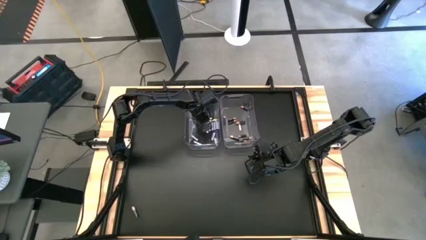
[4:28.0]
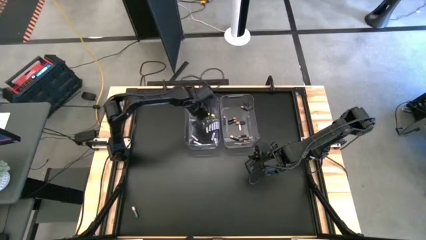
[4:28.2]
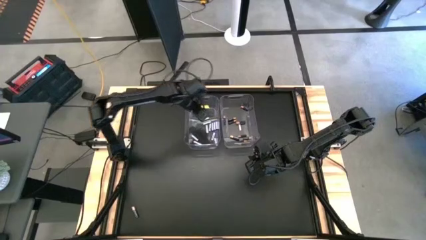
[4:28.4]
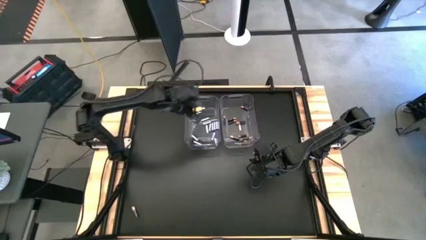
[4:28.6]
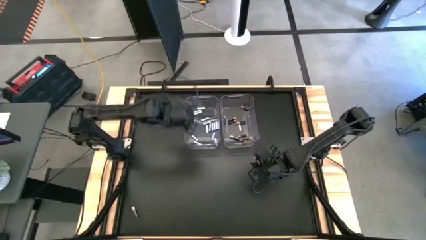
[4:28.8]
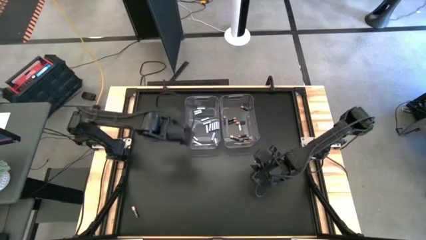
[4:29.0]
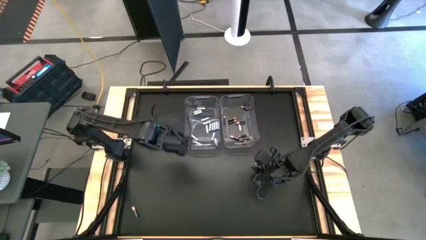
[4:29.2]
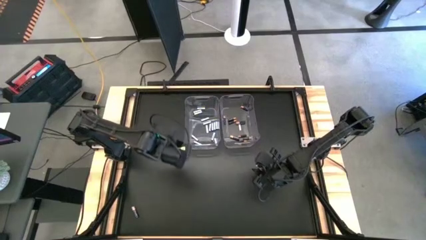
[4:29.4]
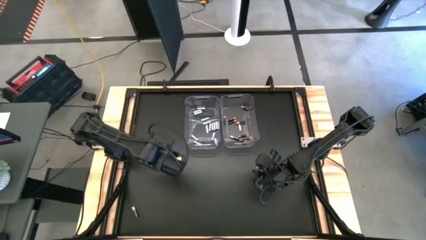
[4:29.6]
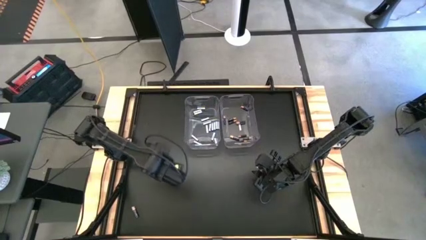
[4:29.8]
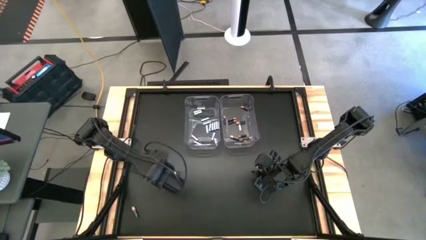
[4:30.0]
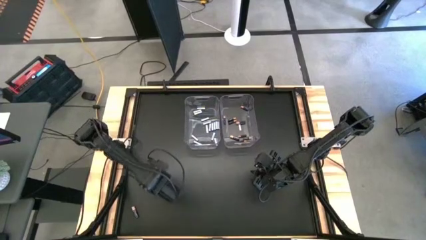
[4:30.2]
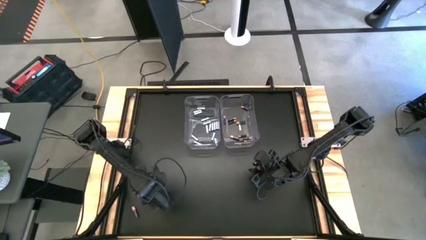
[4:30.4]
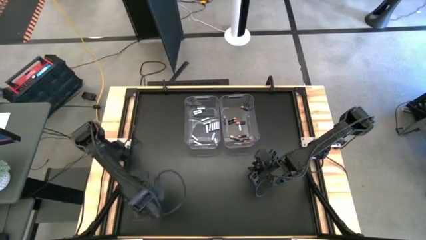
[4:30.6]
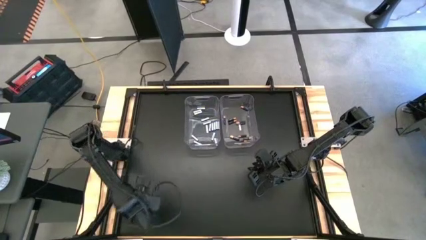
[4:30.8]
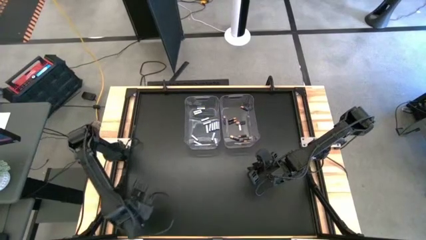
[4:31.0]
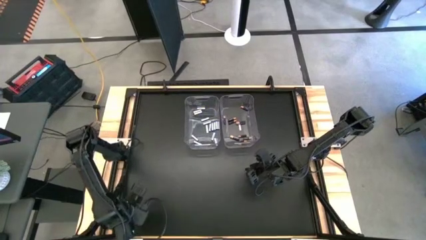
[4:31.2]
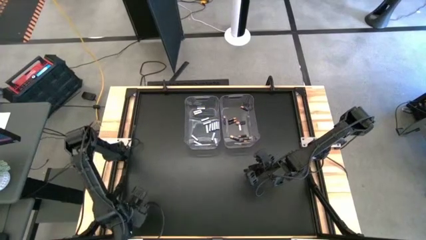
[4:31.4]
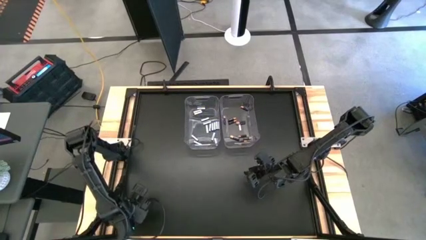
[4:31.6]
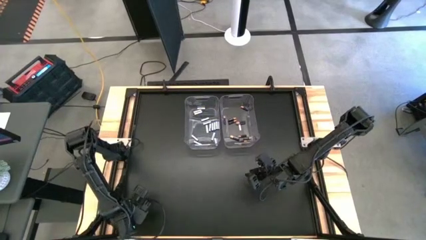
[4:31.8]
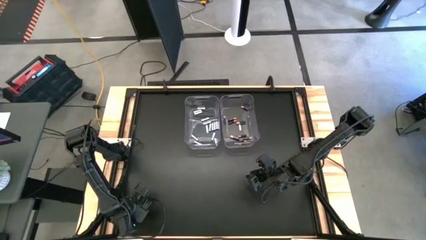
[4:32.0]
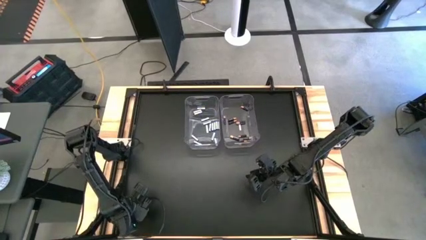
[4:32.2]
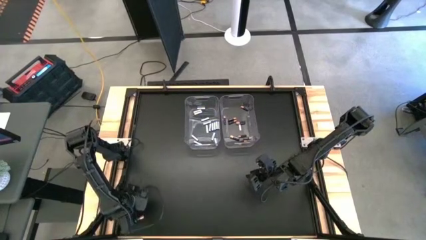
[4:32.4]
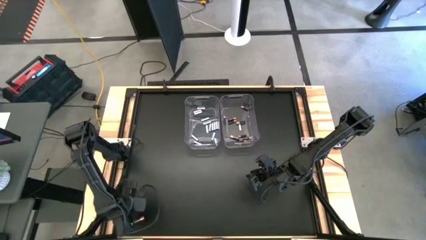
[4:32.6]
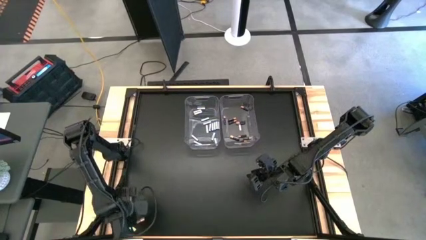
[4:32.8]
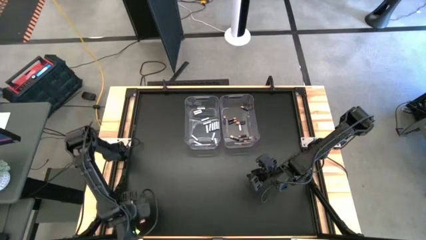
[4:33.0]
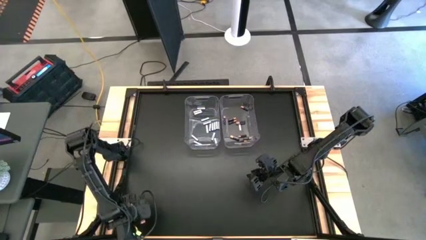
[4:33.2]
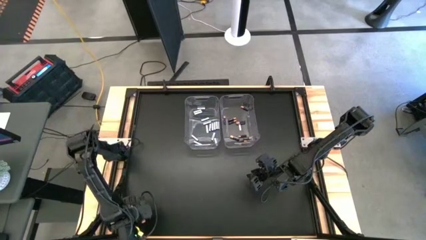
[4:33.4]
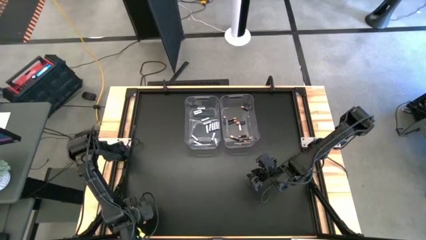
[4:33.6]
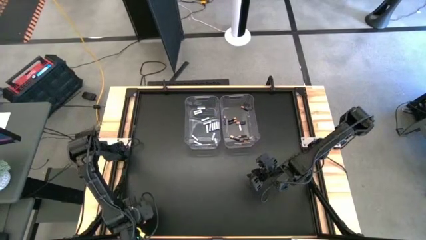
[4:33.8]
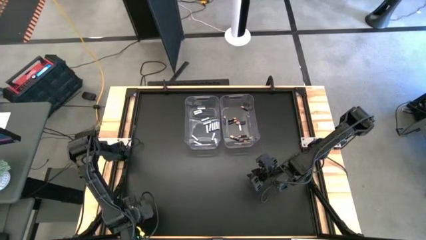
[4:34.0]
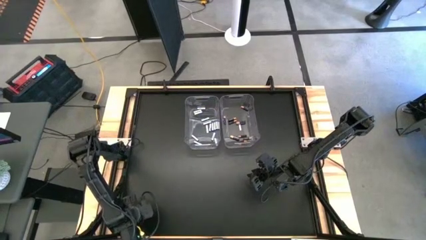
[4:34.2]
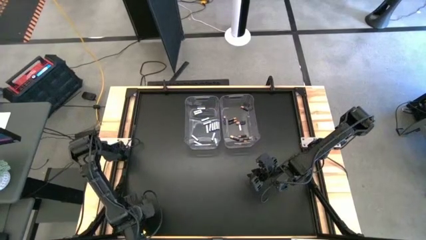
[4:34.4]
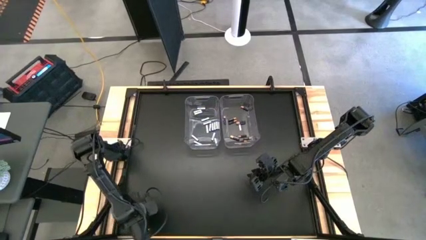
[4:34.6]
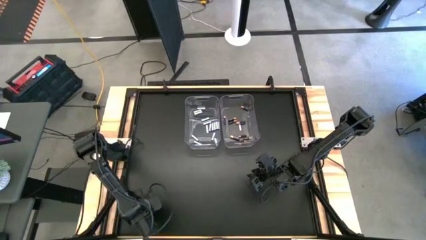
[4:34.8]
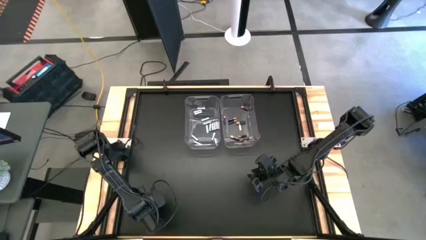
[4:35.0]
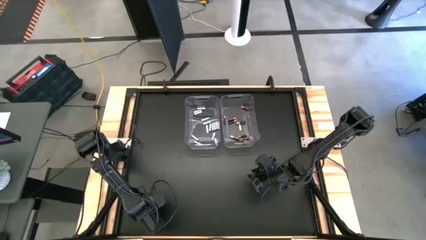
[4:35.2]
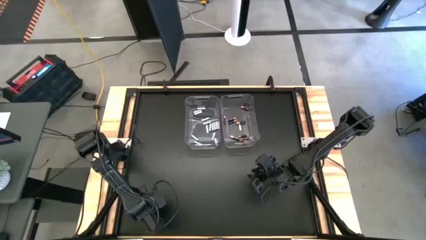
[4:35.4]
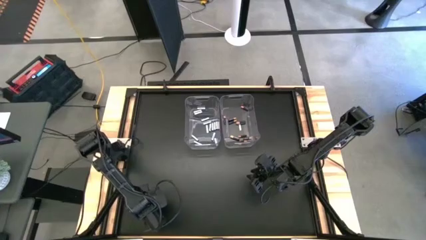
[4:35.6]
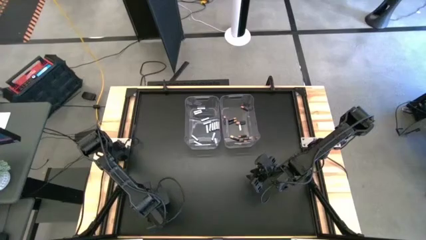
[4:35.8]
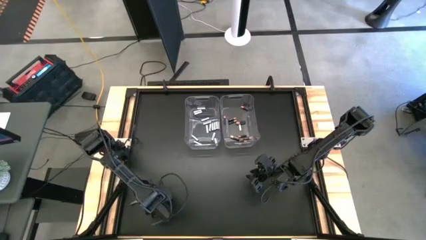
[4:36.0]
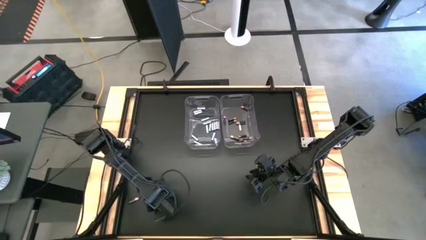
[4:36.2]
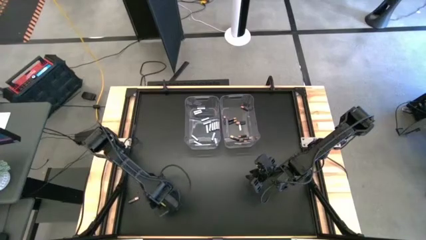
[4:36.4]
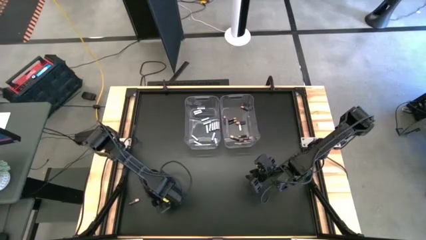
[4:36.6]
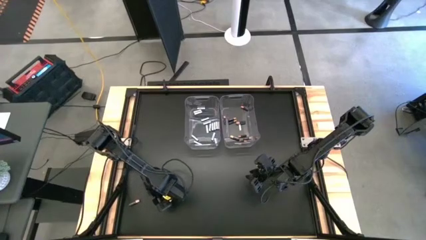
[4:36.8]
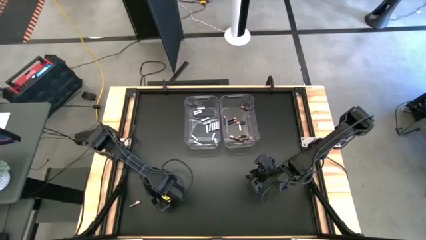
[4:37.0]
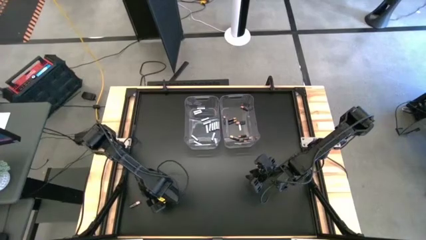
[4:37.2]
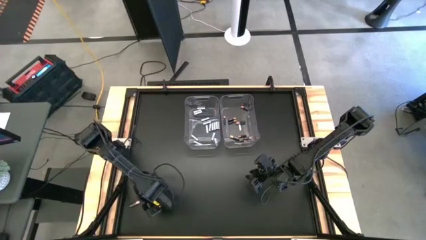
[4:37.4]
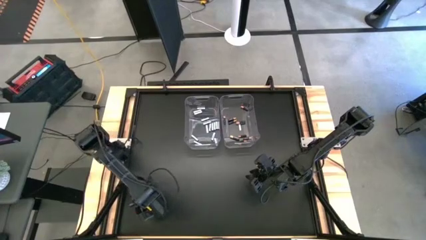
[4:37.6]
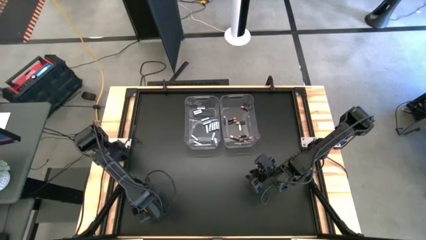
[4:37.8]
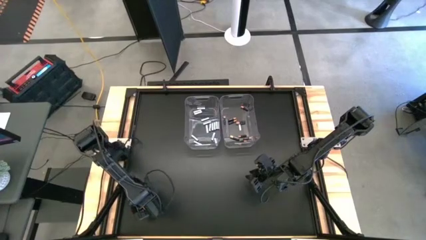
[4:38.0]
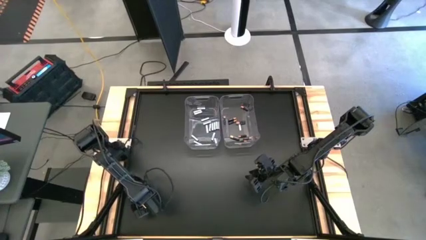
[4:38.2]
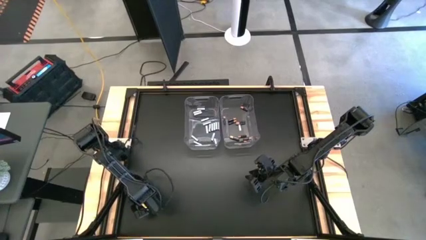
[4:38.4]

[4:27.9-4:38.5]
Task: Sort batteries
Put the black battery into the right transparent bin

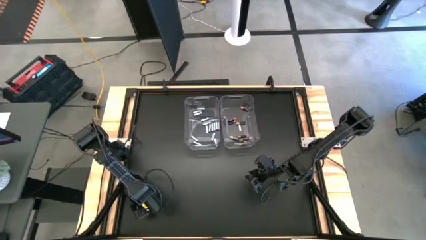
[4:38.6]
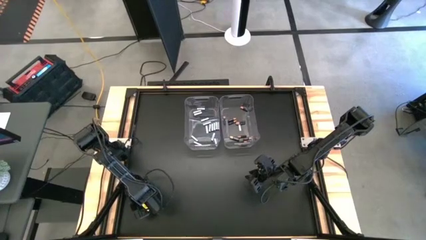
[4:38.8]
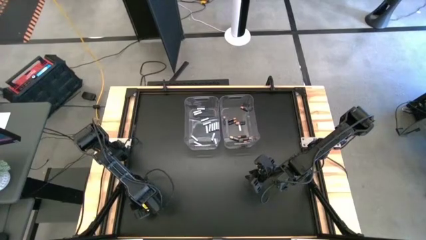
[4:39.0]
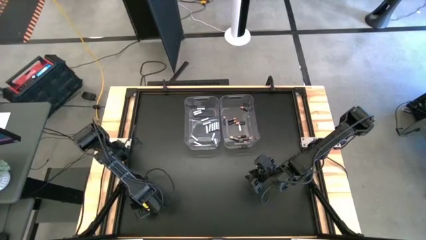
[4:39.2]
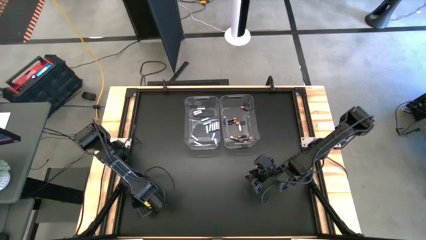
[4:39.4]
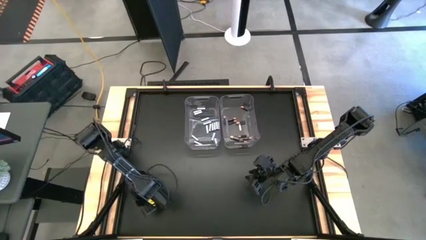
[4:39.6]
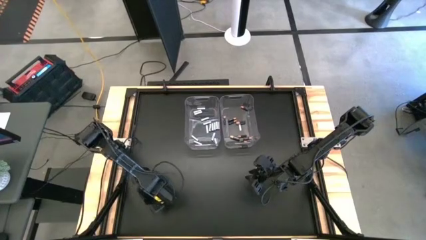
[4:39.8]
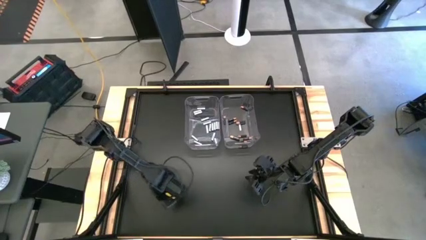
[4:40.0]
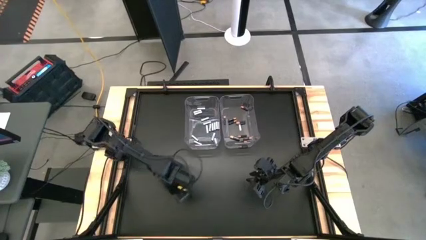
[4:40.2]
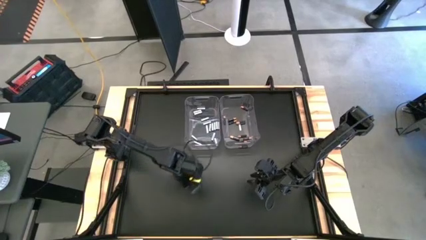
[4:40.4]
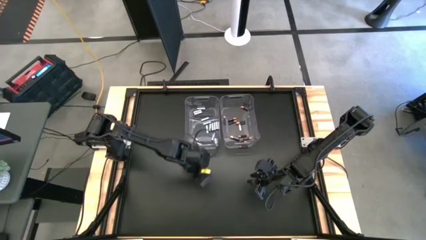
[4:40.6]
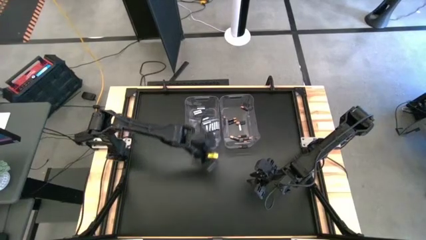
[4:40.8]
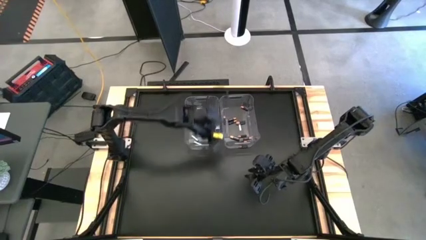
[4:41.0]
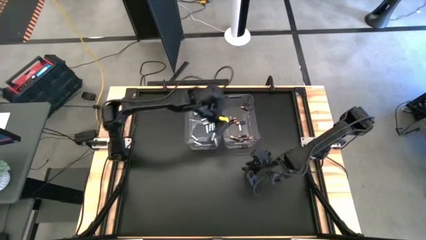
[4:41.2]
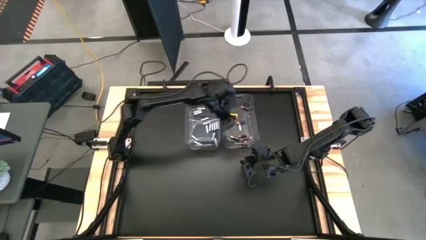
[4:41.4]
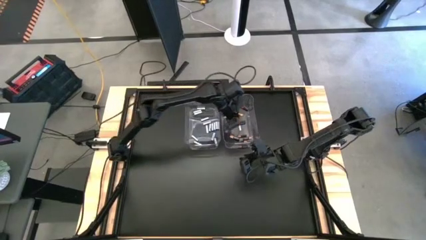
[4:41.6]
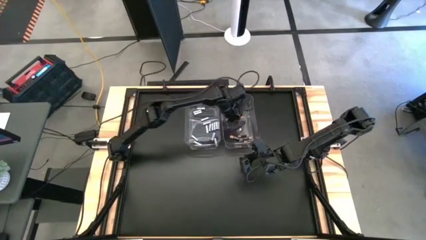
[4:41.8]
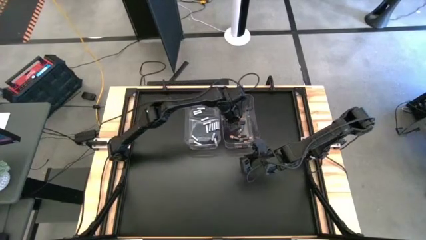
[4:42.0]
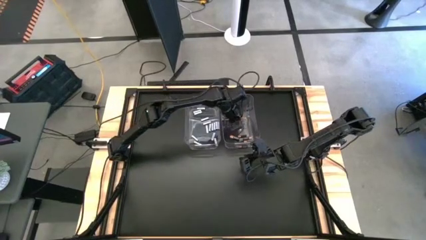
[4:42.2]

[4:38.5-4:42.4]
Put the black battery into the right transparent bin

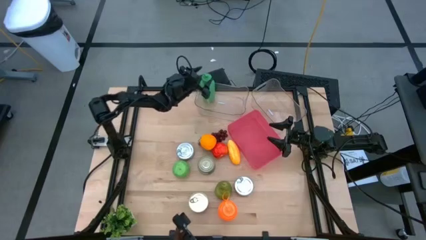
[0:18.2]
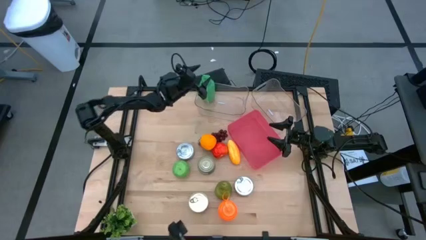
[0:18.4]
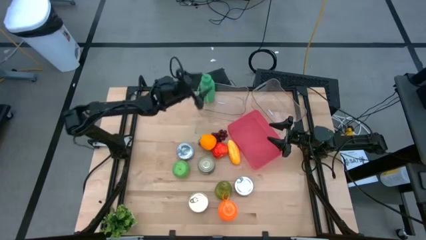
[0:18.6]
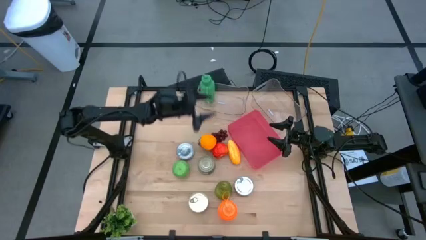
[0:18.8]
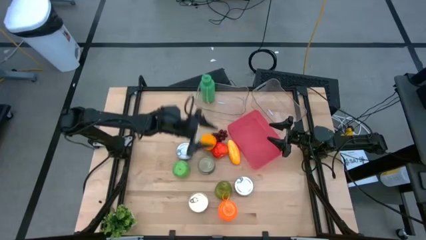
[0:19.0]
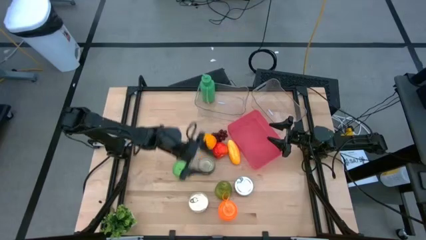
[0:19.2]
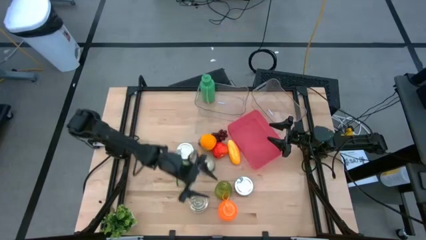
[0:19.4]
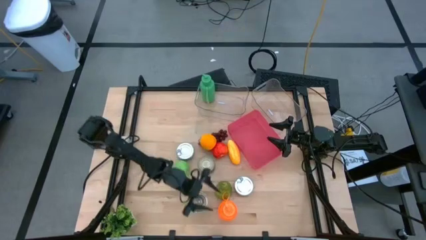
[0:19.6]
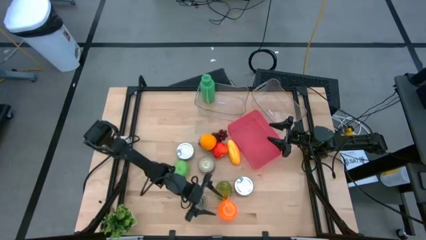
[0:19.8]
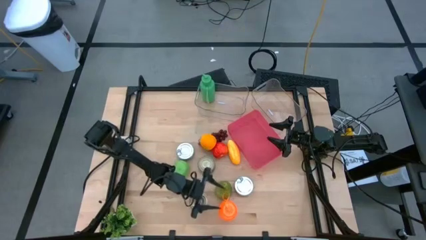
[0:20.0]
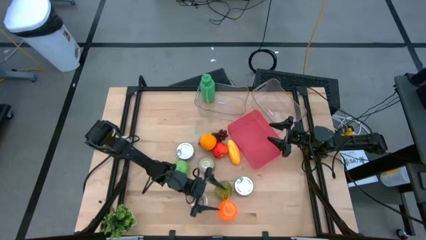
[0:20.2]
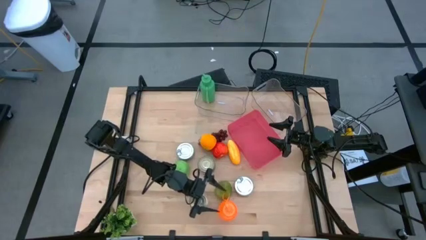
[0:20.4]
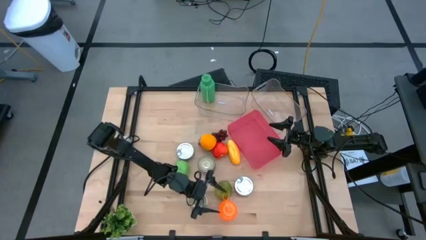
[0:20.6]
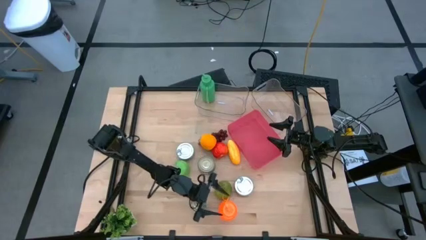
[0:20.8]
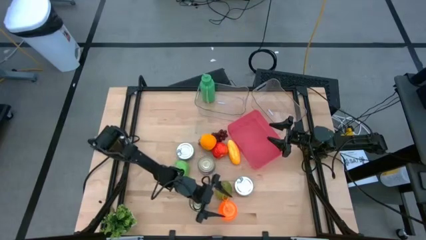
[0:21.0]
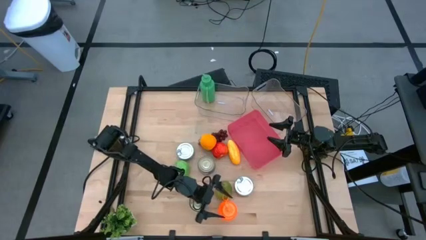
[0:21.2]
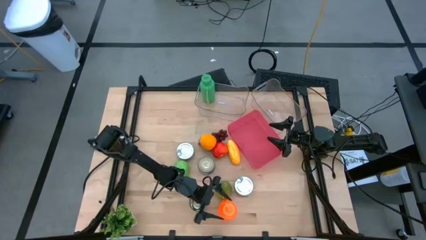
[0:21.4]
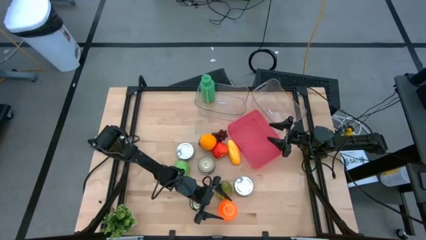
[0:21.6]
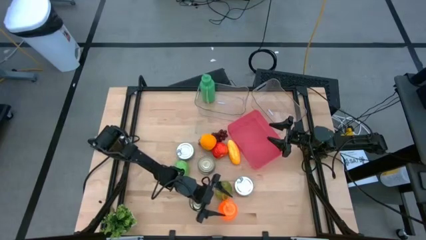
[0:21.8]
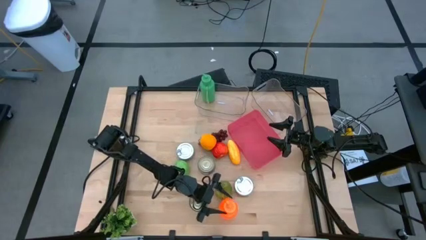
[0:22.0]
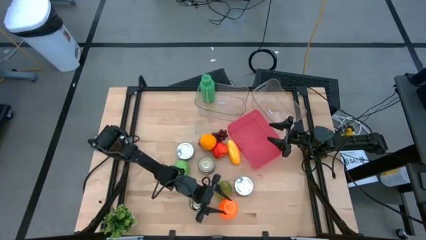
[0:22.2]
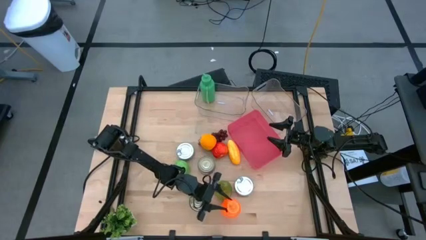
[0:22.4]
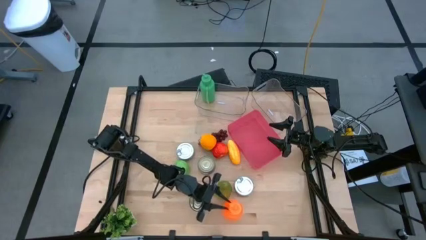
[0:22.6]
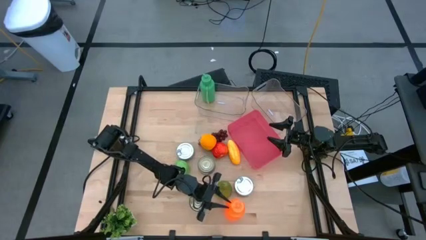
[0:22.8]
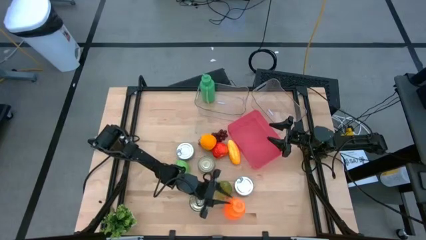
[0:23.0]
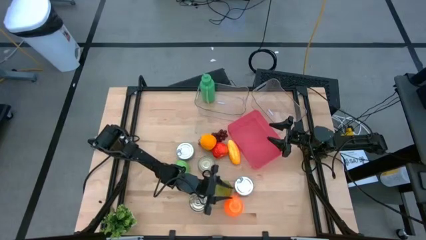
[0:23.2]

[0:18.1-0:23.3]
Task: Pick & Place Food Item
Put the orange water bottle into the left transparent bin
